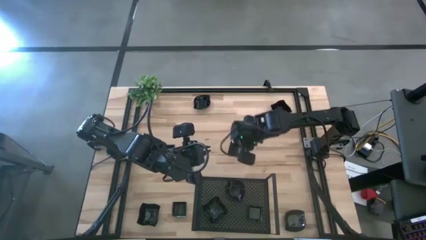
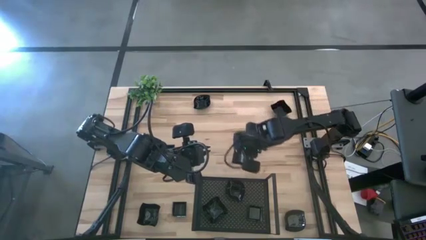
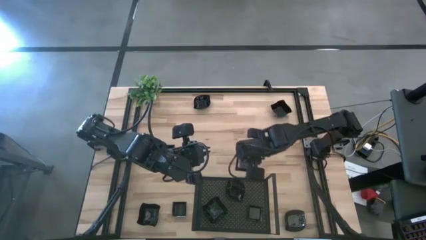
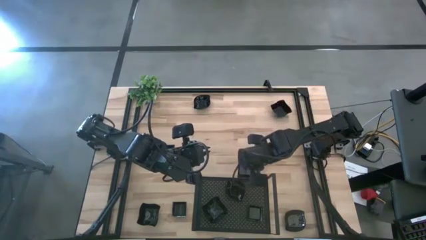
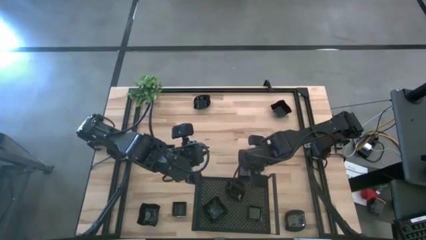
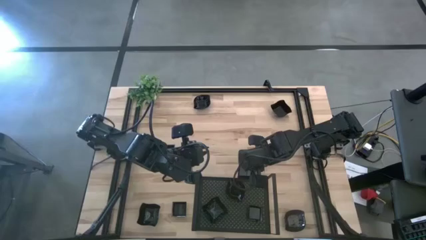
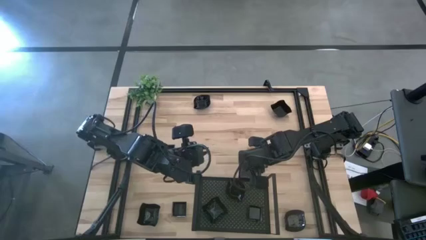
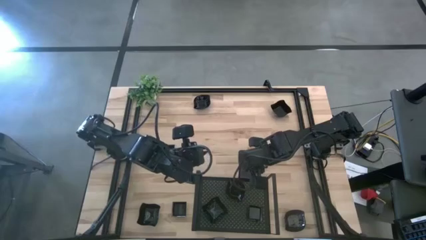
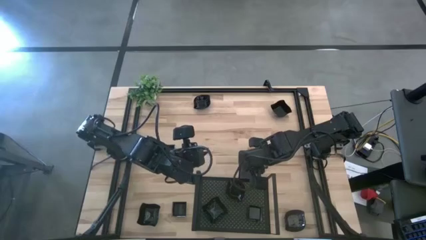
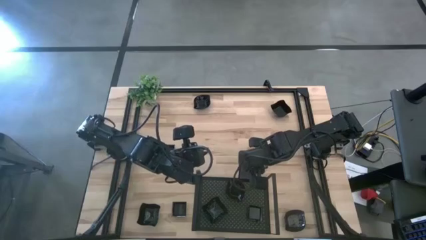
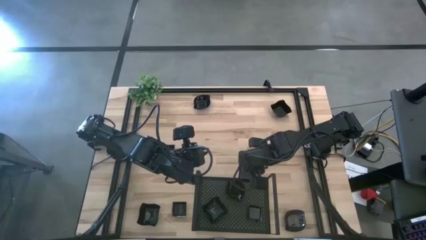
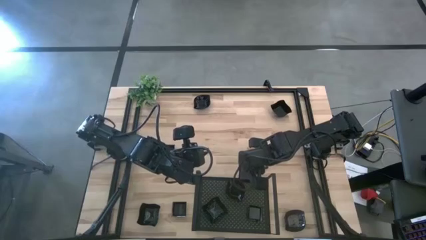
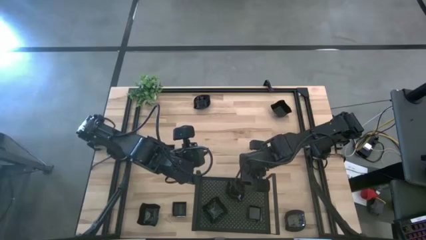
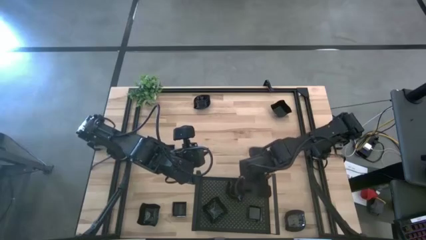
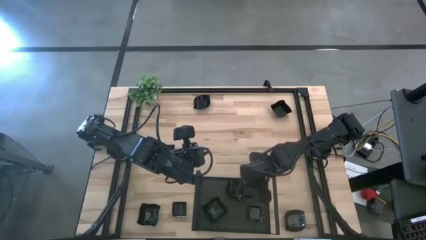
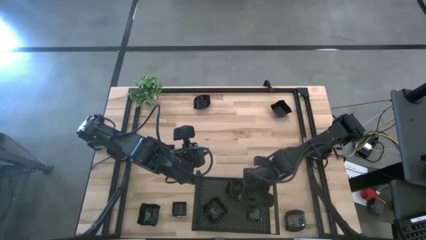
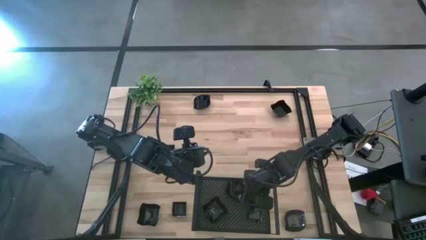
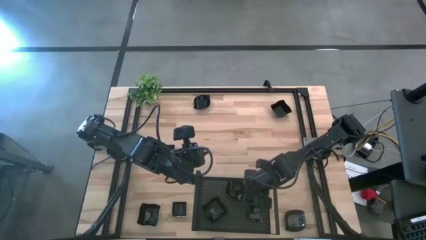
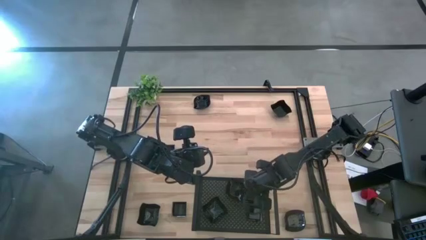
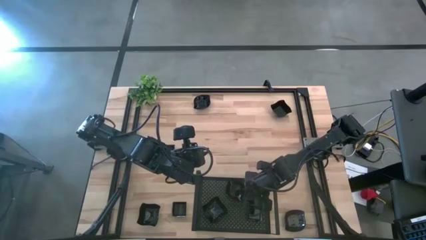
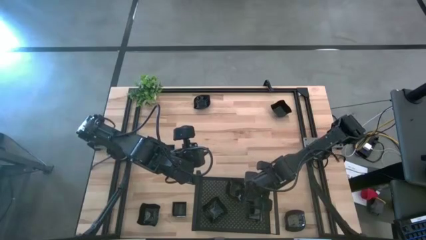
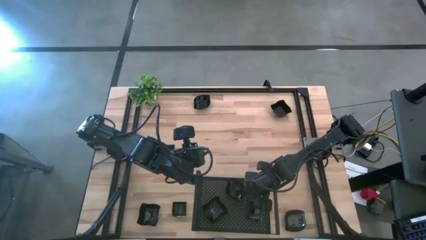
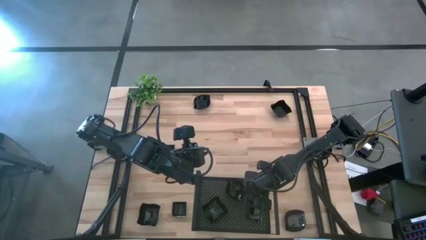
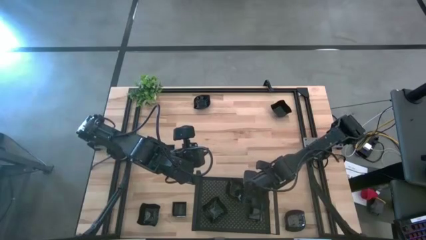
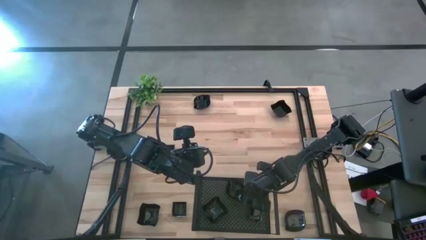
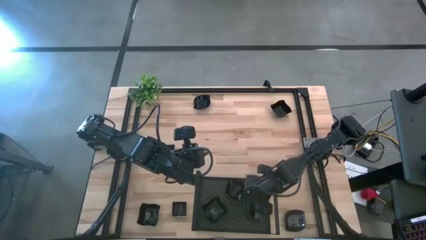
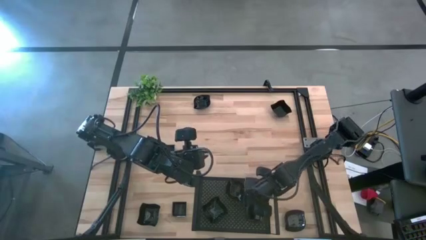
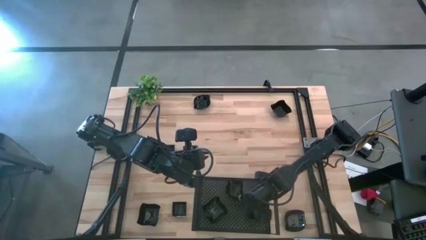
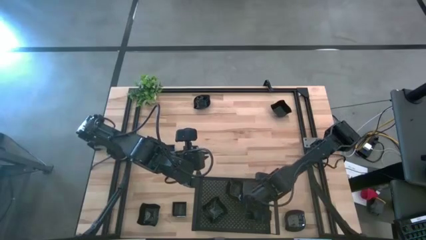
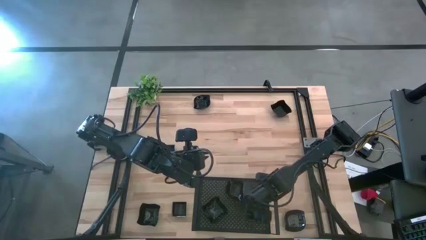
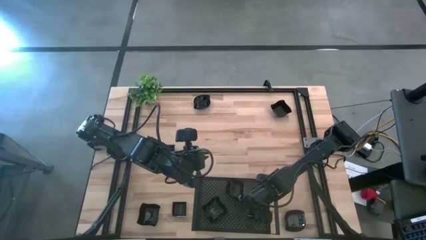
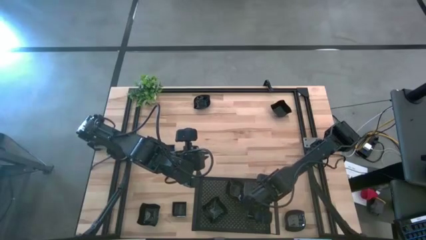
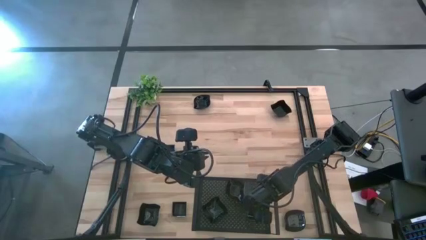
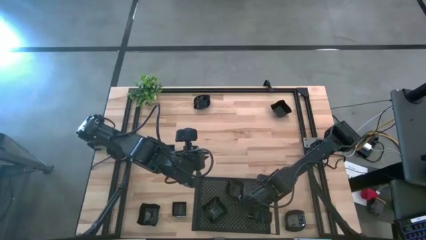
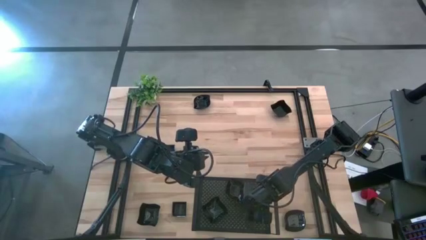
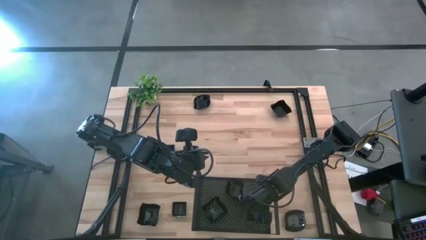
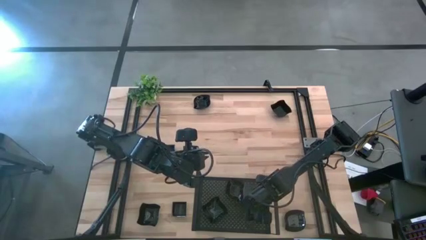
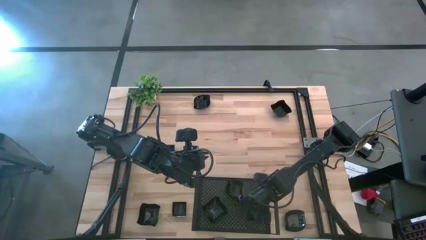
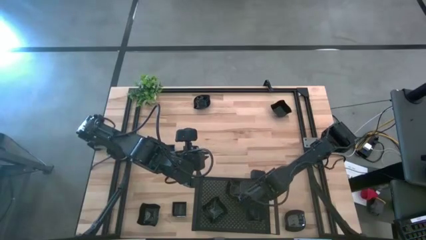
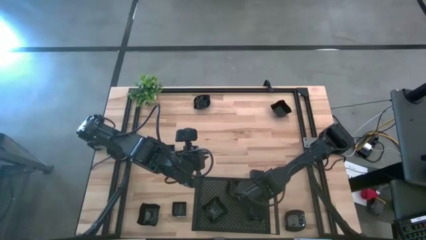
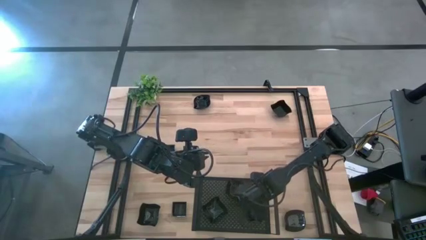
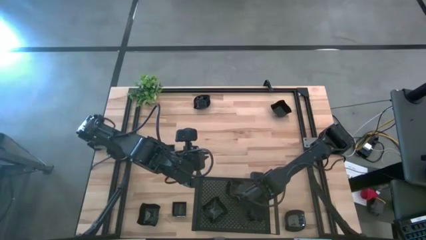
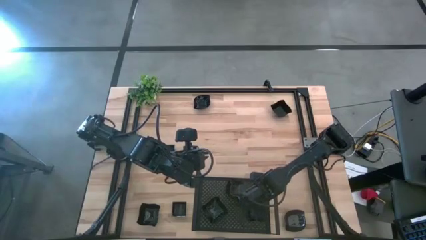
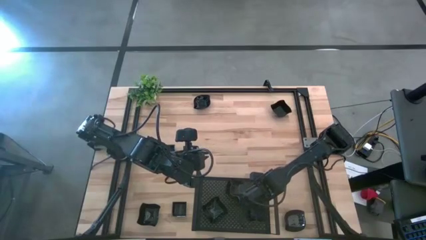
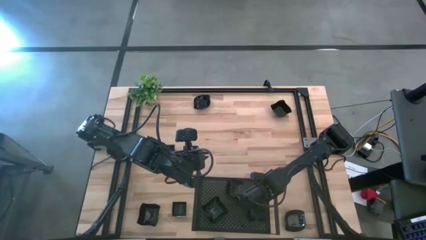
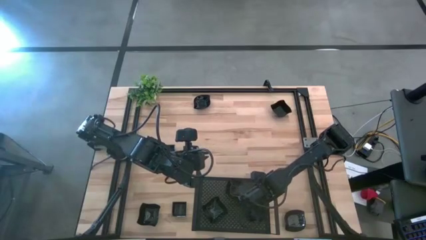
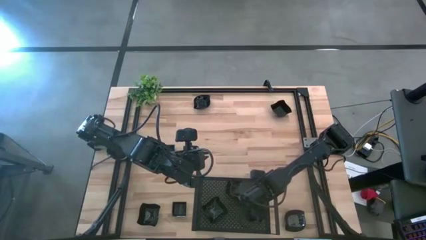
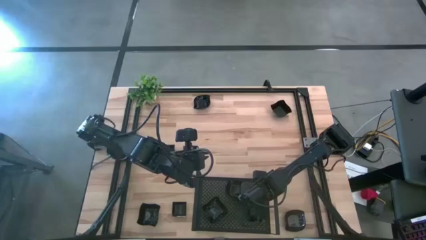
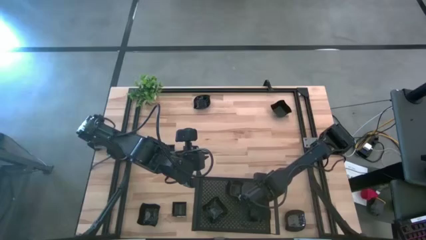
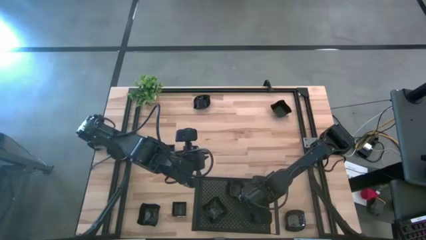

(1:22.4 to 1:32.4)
Task: Pick & Place Mini shaped plates
Stack the square plate on top of the other square plate on the shelf

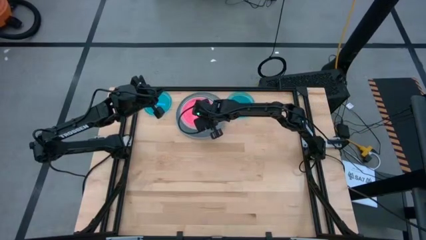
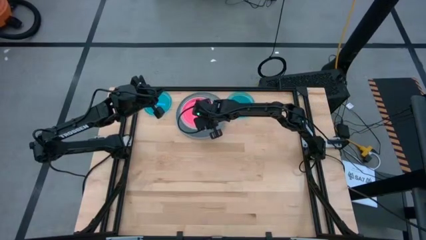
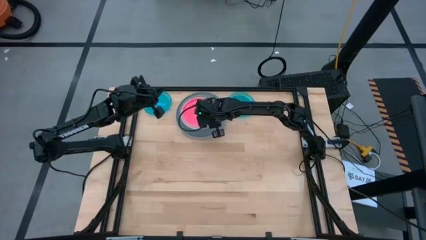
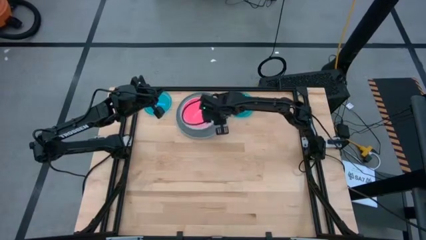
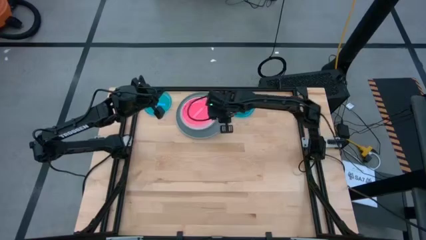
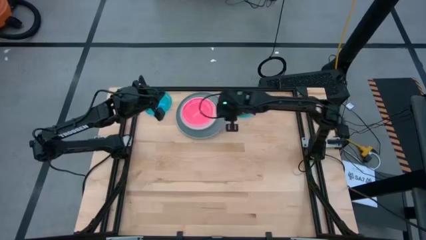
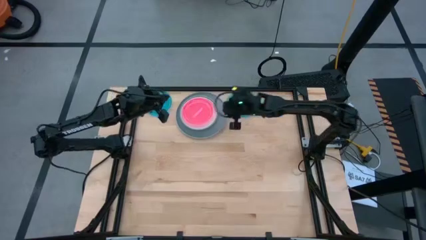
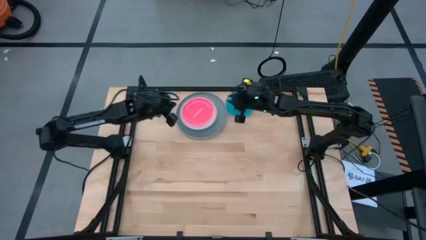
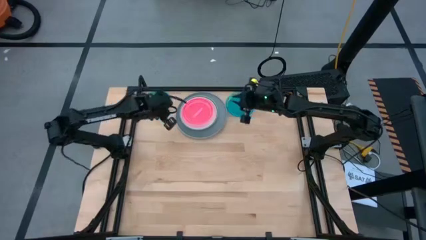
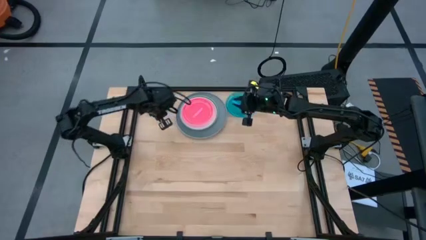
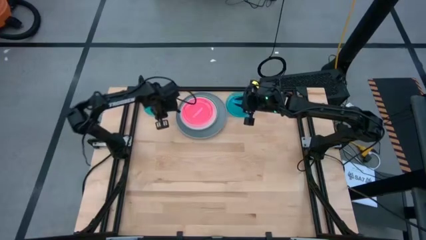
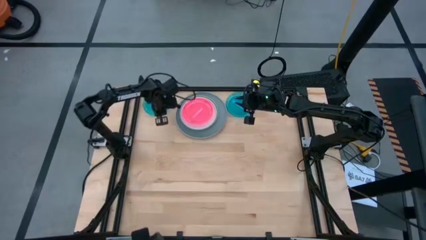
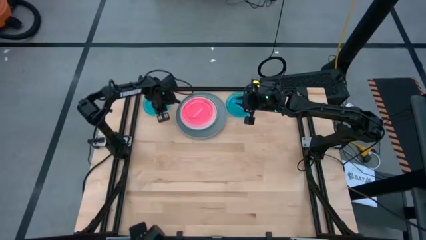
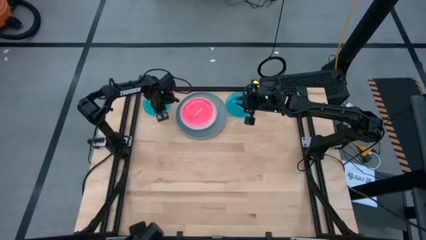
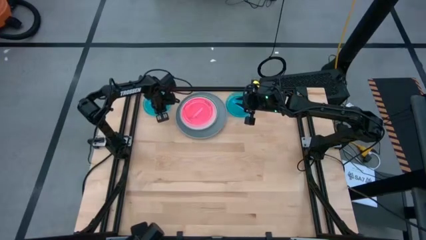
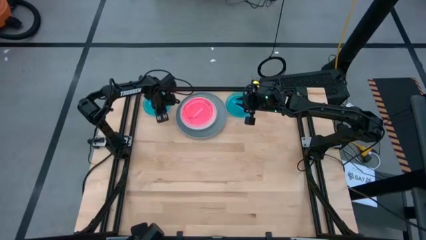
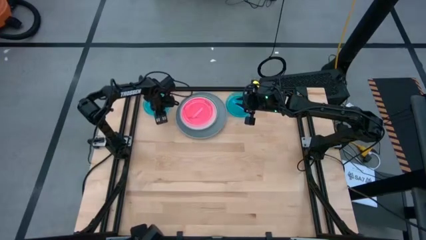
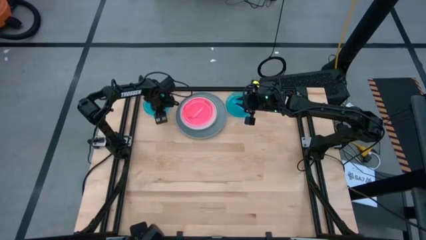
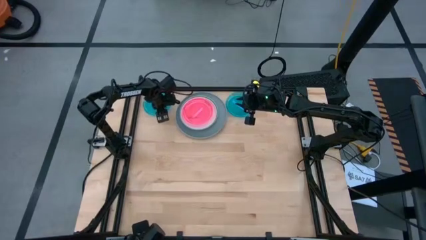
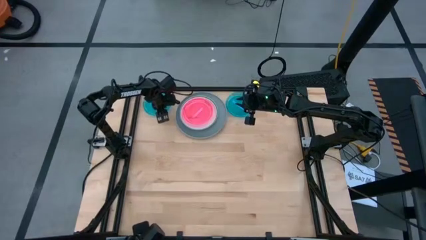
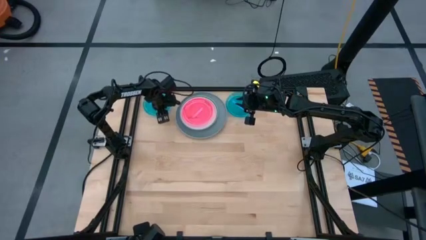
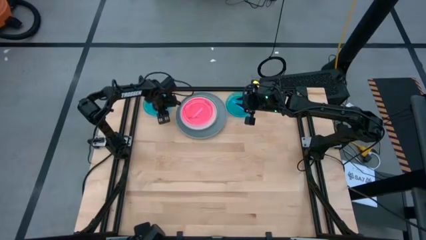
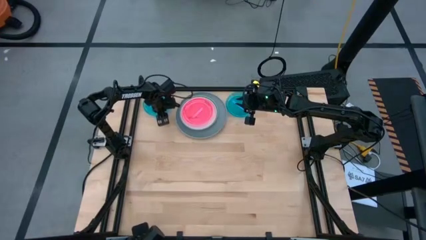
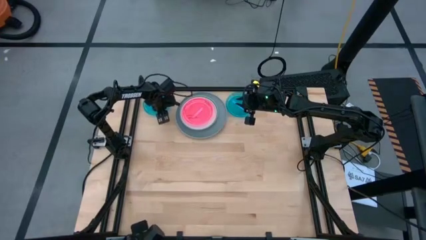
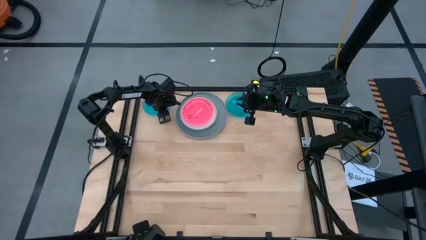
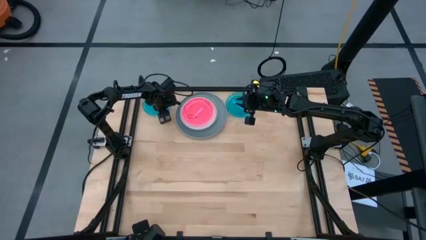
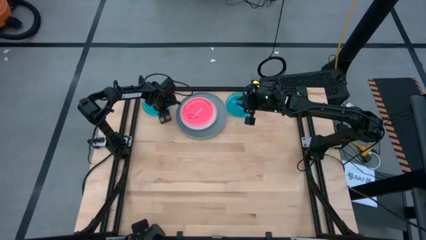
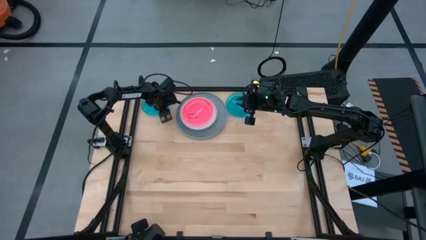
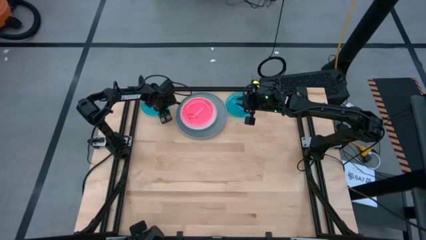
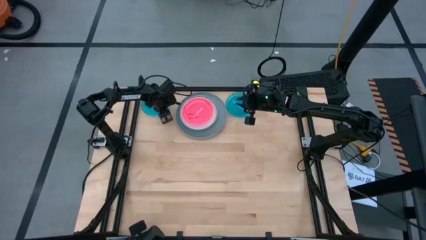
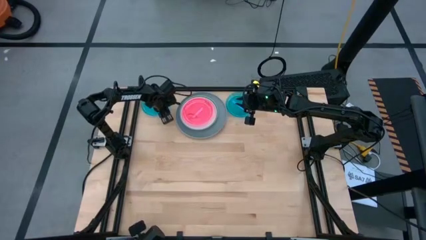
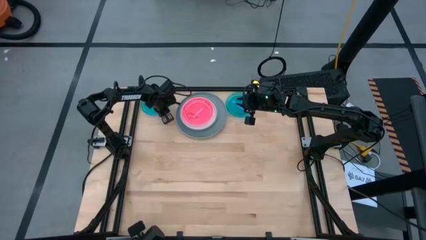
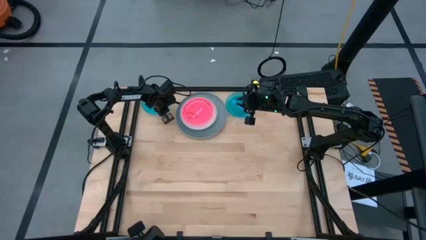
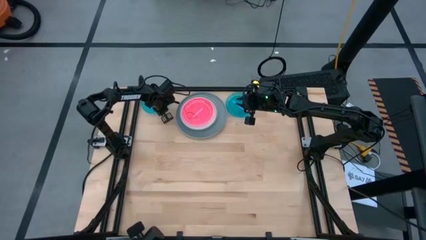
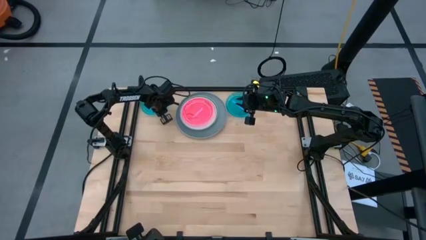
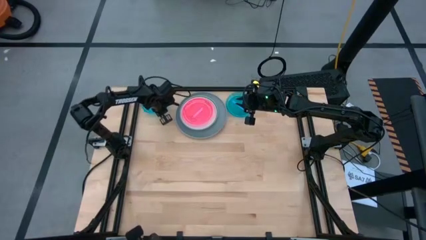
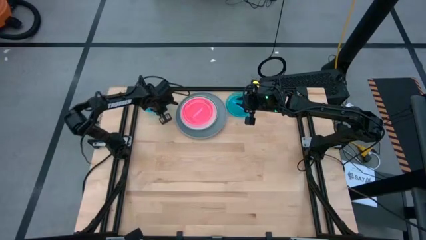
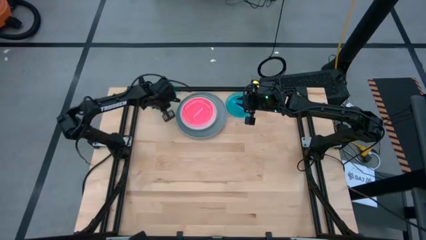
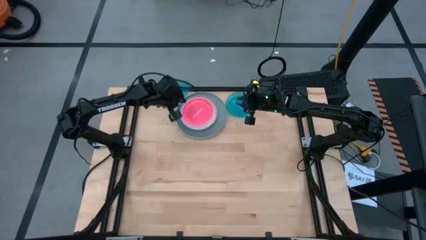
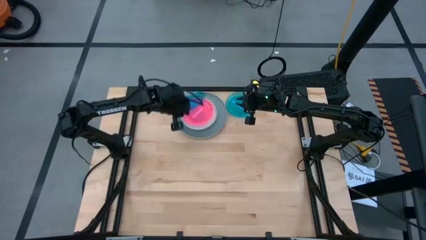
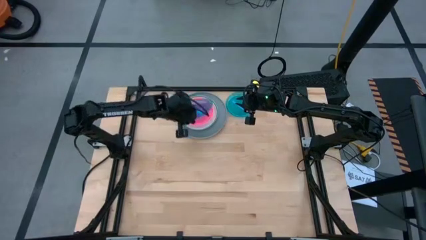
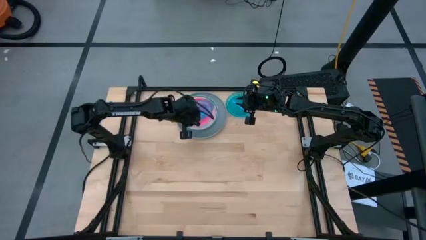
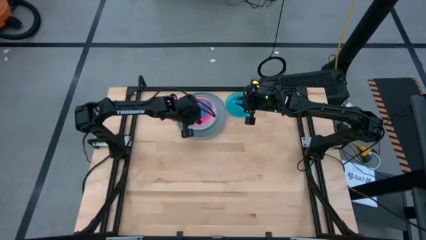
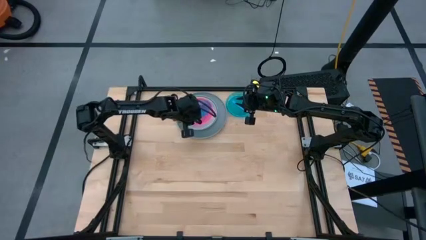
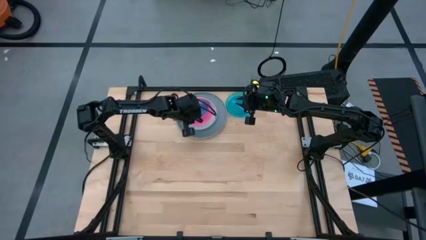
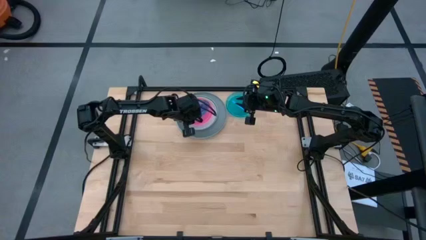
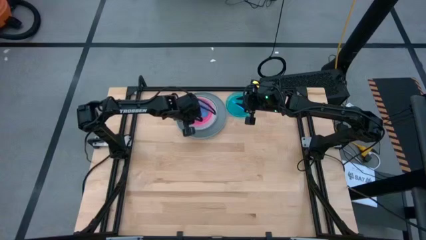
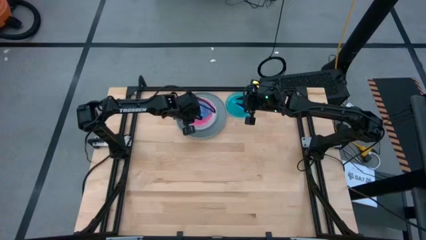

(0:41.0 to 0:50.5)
Task: Stack plastic plates
Stack the left blue plate on top of the pink plate
